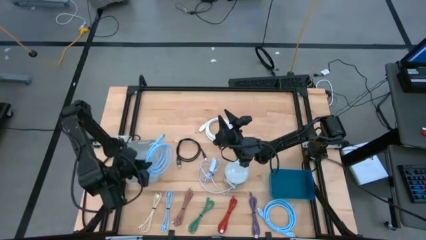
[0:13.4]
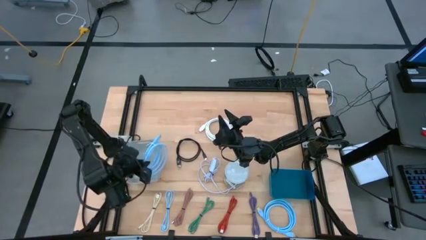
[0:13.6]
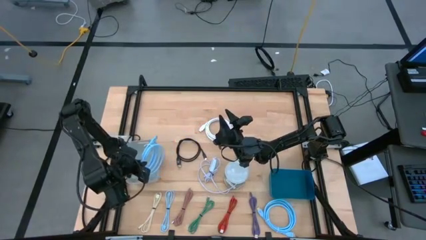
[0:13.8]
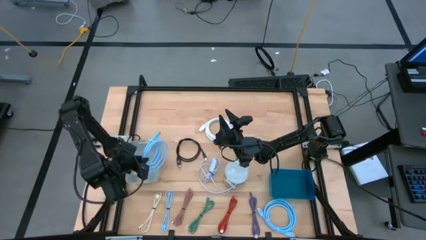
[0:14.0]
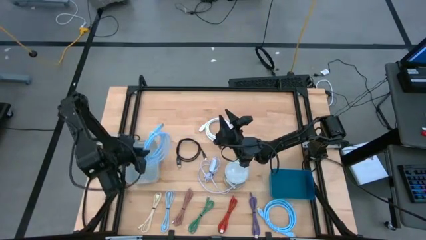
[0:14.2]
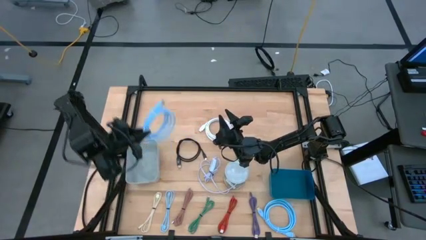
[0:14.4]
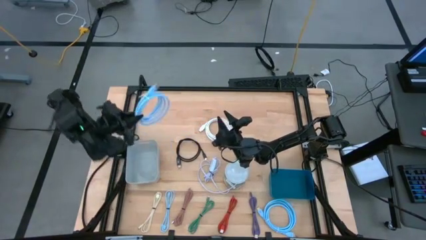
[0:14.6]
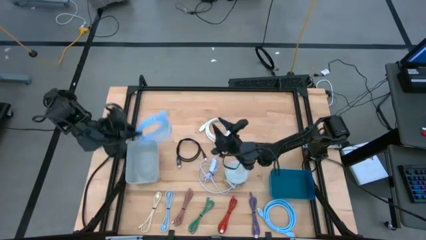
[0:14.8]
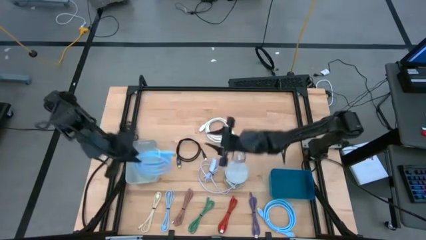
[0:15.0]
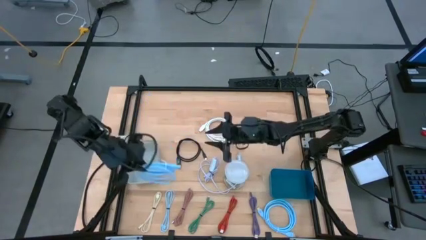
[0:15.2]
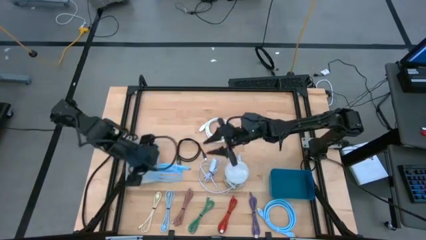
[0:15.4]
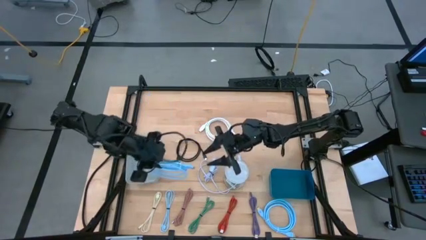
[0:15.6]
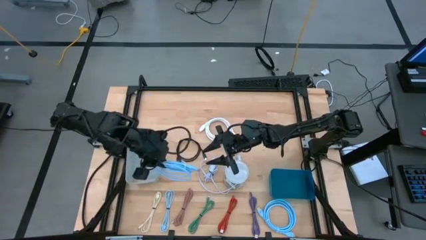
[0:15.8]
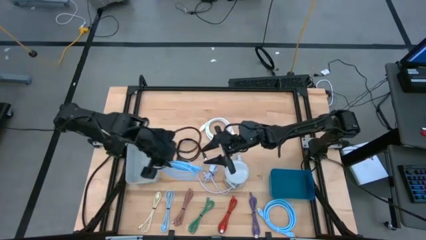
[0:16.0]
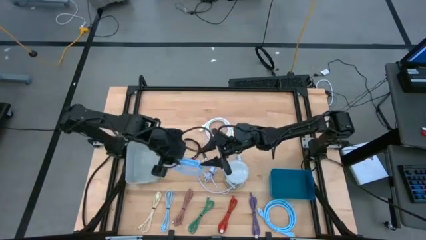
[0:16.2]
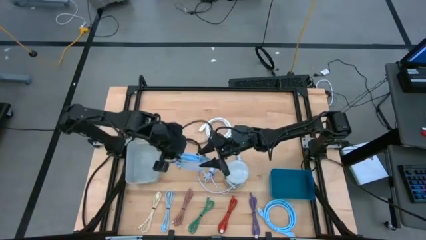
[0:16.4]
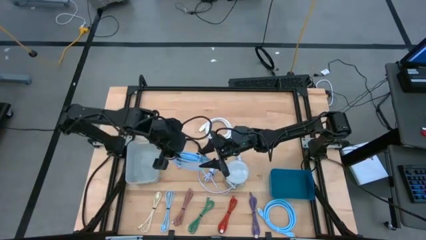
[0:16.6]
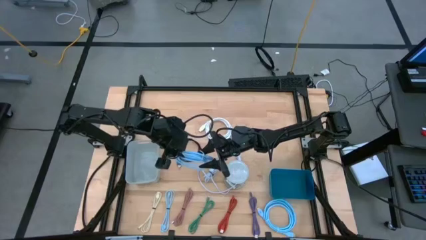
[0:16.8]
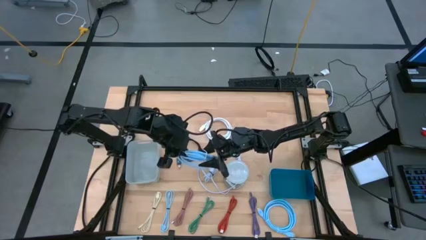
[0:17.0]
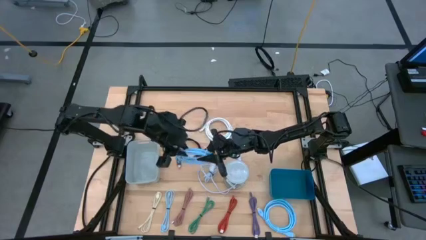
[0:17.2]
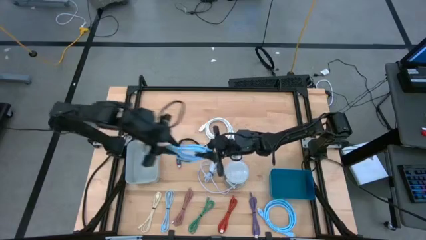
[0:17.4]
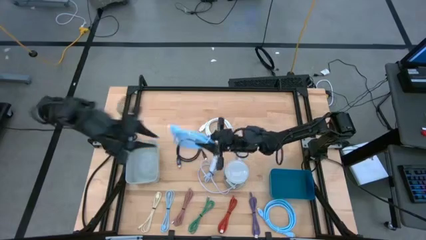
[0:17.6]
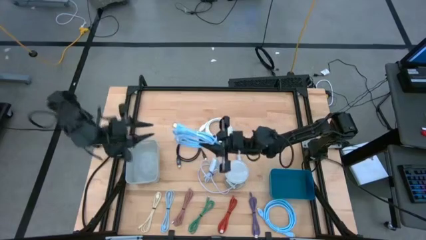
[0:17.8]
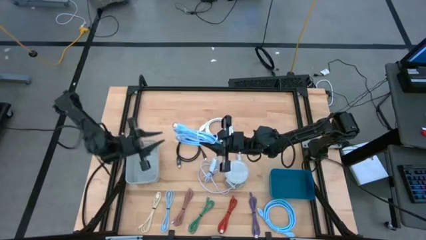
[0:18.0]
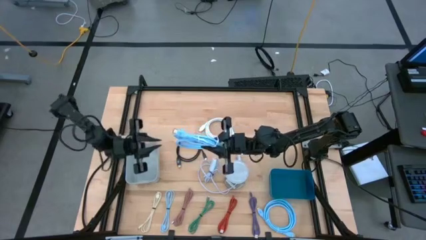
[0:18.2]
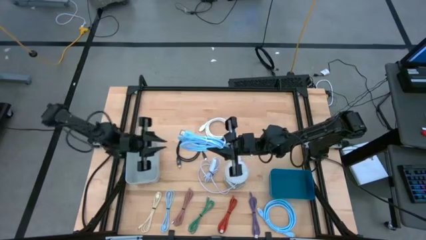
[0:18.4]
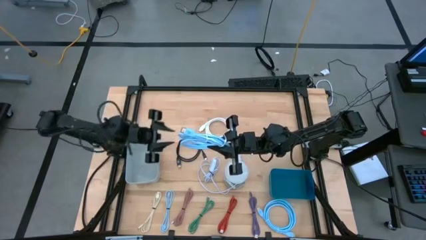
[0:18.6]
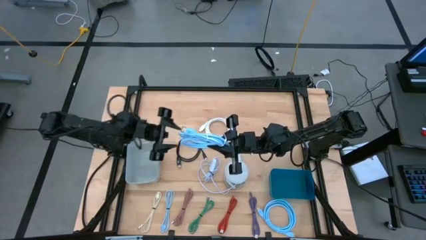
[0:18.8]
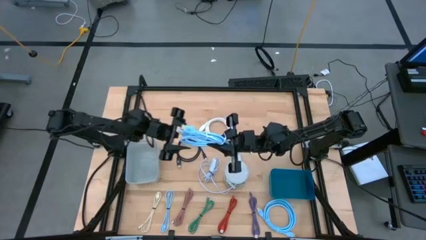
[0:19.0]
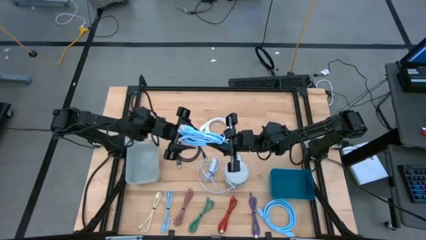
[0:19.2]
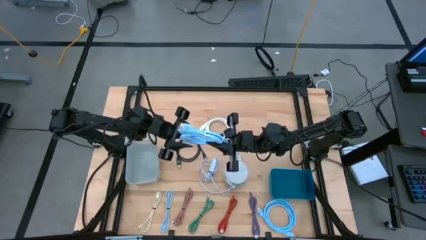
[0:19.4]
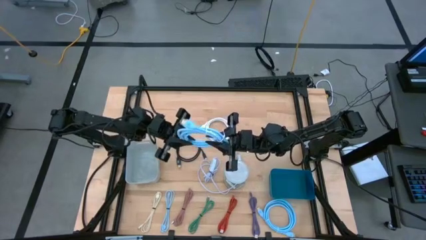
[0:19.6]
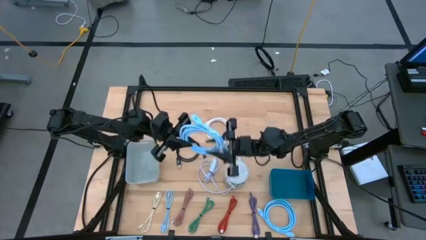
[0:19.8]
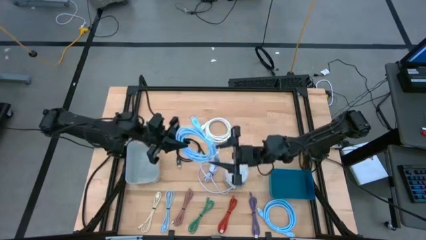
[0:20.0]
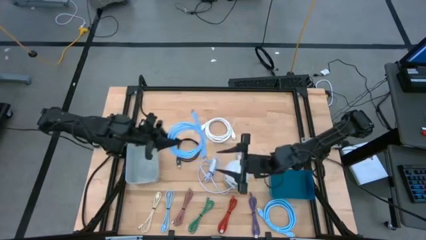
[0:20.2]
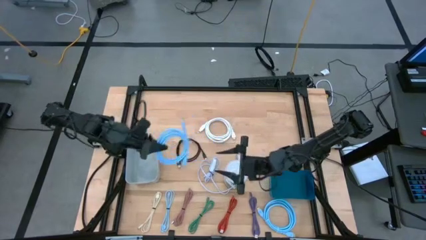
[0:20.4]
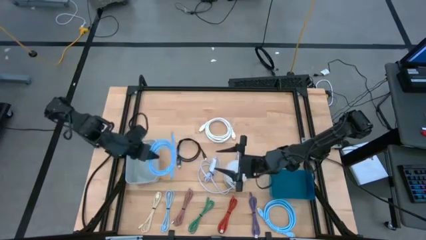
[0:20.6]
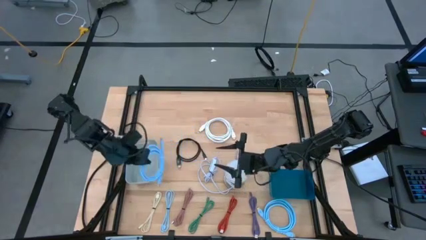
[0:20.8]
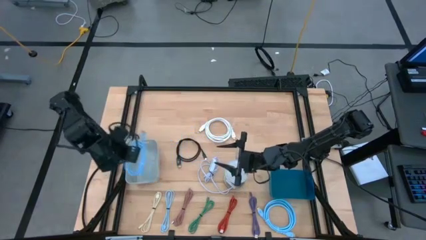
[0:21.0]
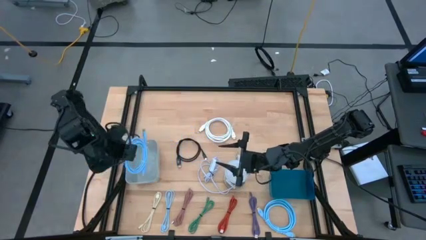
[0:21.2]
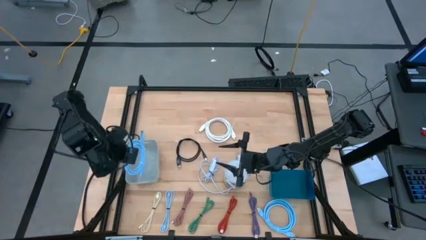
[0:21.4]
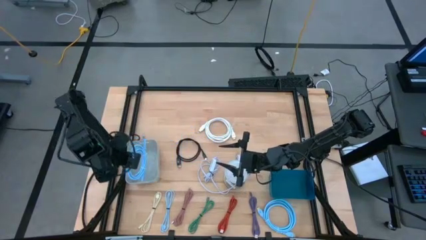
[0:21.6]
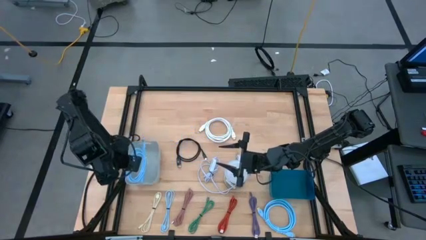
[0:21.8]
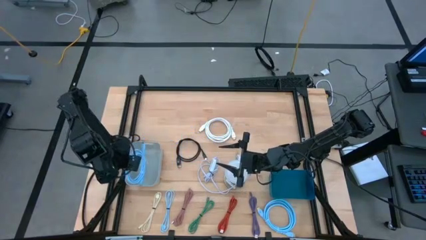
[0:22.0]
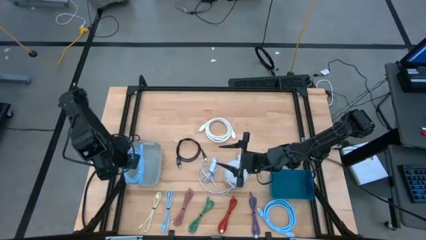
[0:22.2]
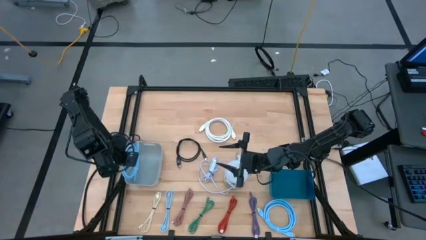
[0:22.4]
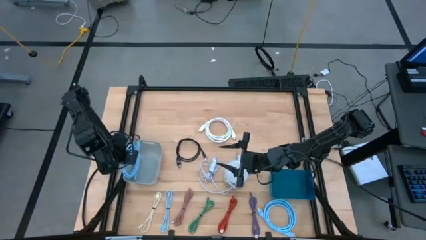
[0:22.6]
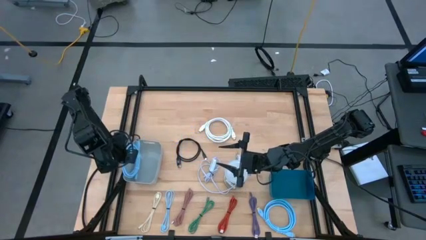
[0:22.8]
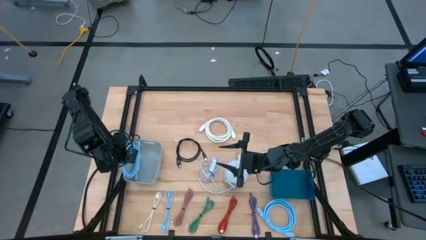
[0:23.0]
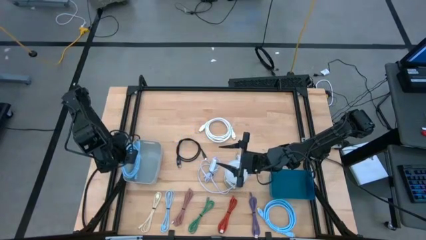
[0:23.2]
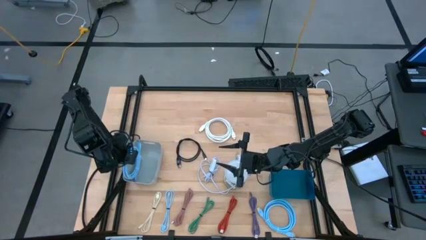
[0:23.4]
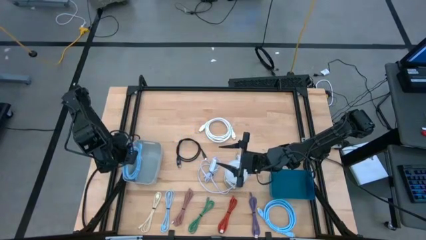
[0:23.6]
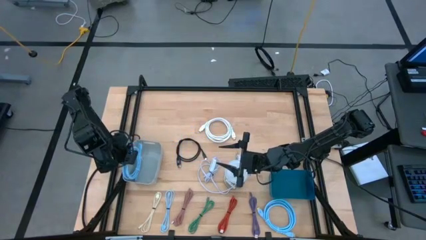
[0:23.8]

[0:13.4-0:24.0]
Task: Pick & Place USB Port
Put the top light blue HDMI cable into the gray bin

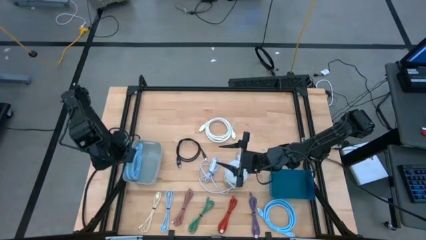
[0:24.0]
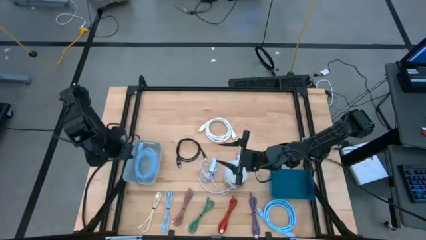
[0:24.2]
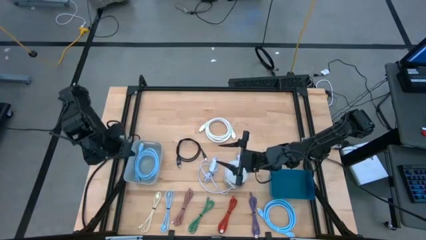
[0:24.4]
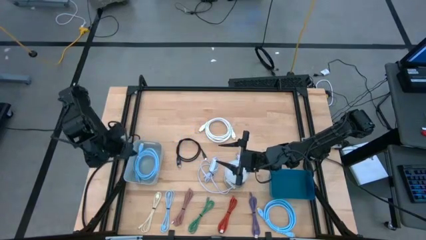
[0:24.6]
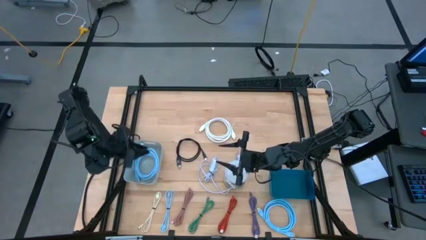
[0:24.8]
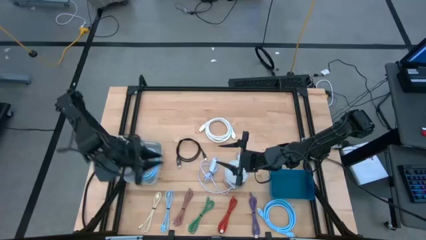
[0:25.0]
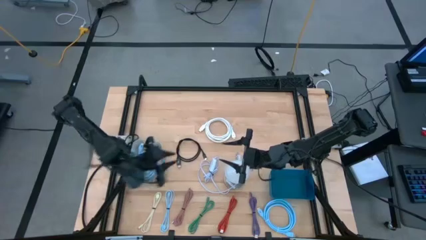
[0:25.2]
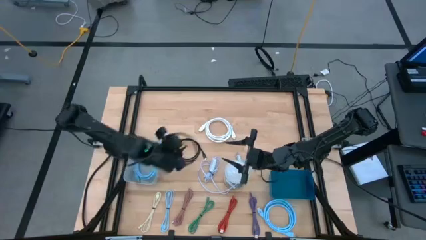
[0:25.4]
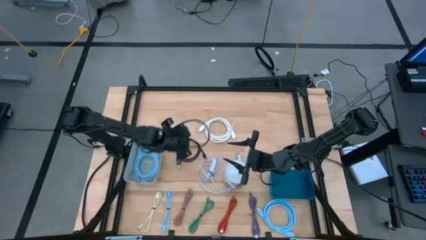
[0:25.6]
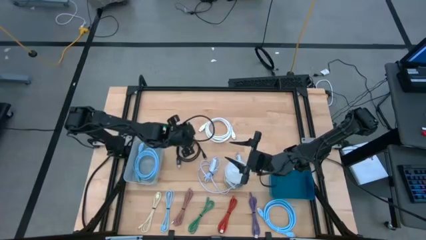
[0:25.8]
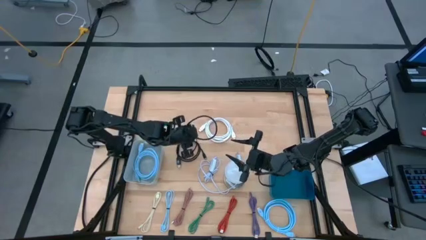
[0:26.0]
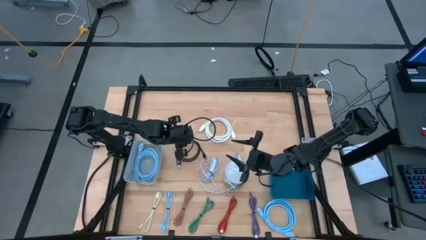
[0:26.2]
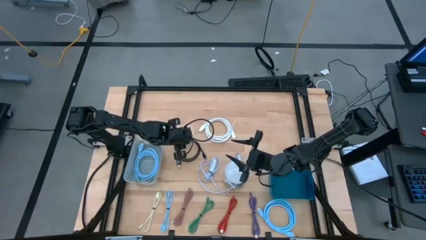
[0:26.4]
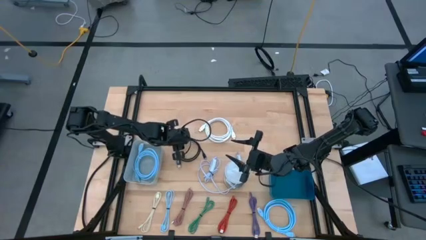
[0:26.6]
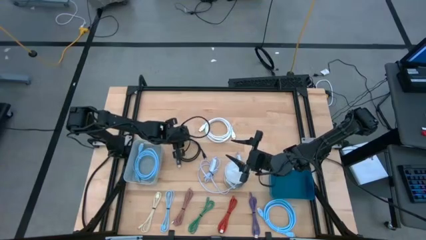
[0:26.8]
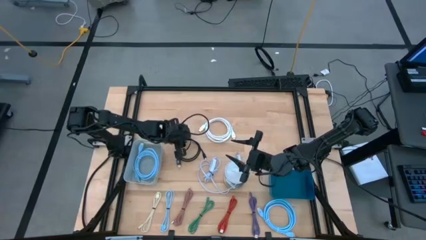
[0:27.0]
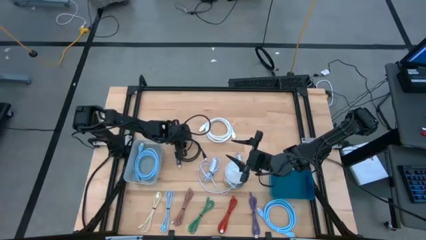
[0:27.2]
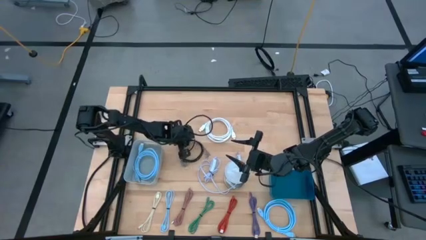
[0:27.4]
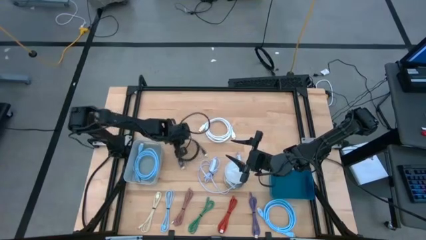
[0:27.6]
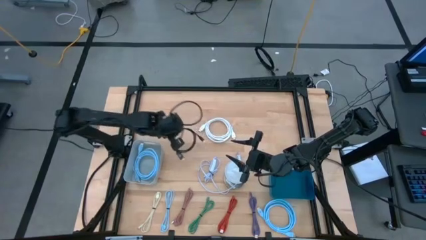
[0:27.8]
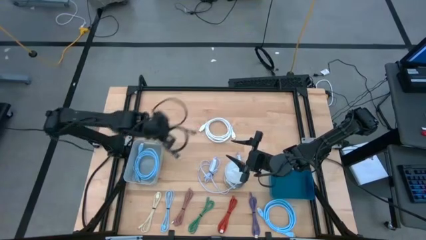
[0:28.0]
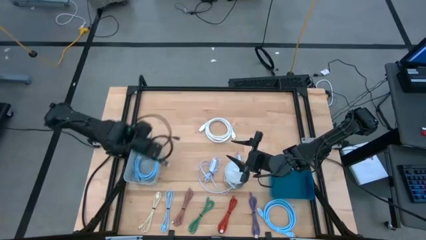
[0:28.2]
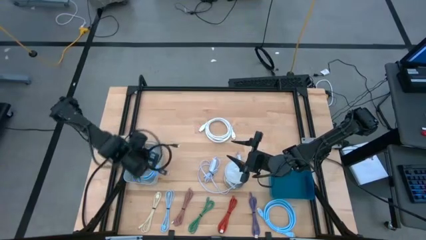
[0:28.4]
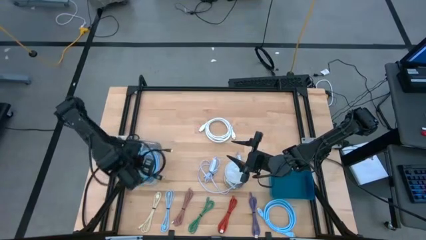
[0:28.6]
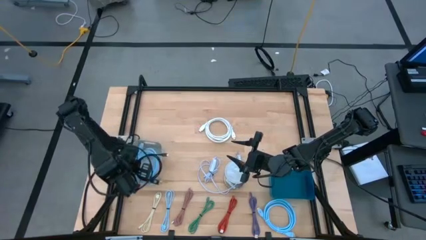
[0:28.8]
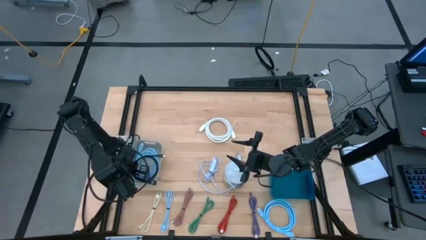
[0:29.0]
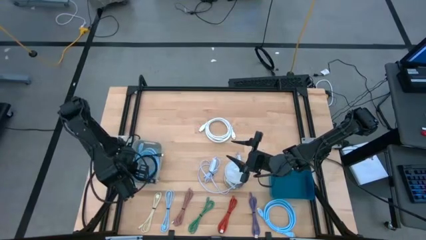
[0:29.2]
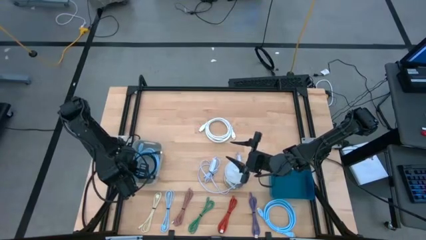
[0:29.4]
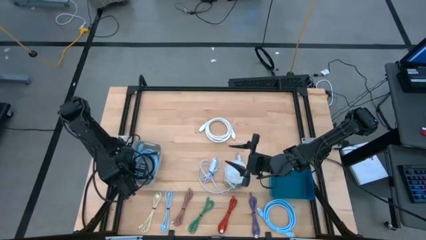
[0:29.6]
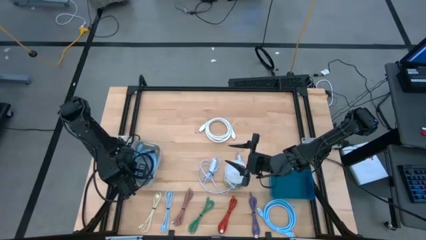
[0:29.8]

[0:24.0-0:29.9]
Put the black HDMI cable into the gray bin
